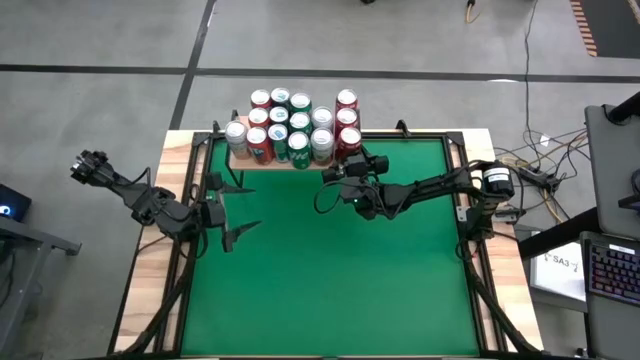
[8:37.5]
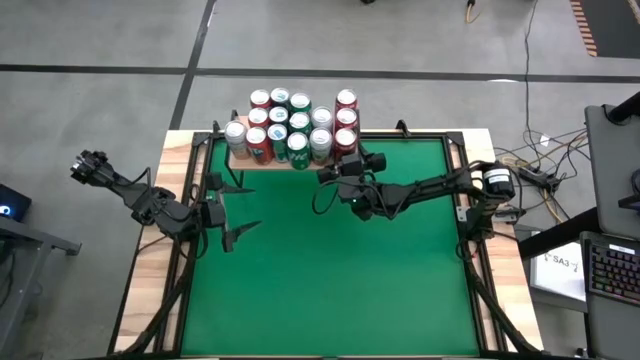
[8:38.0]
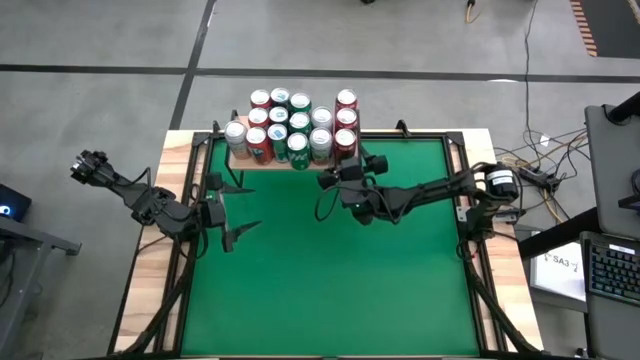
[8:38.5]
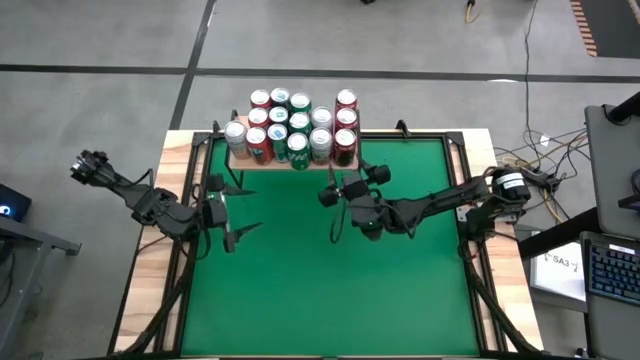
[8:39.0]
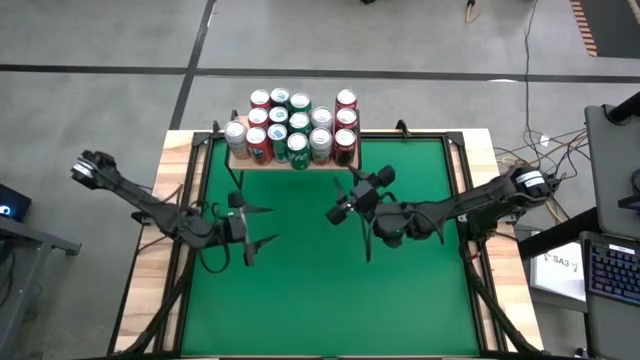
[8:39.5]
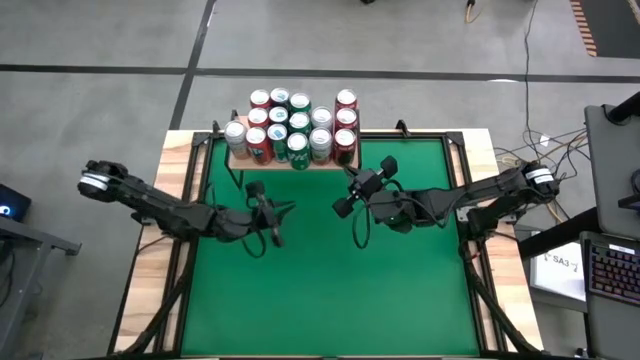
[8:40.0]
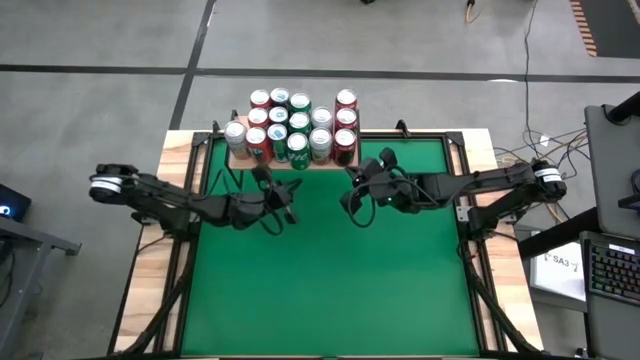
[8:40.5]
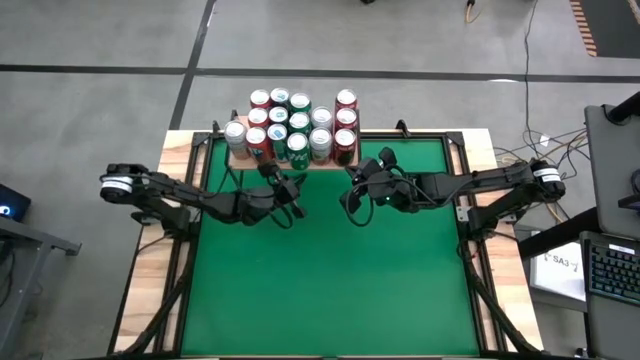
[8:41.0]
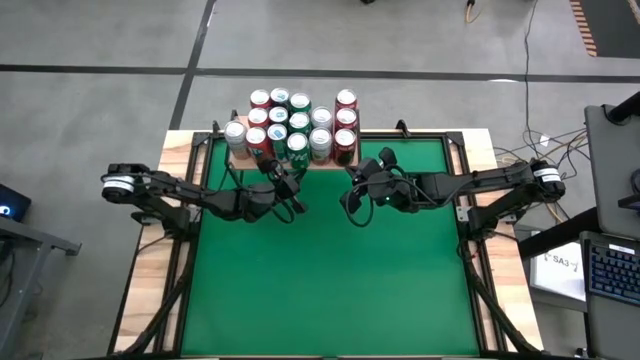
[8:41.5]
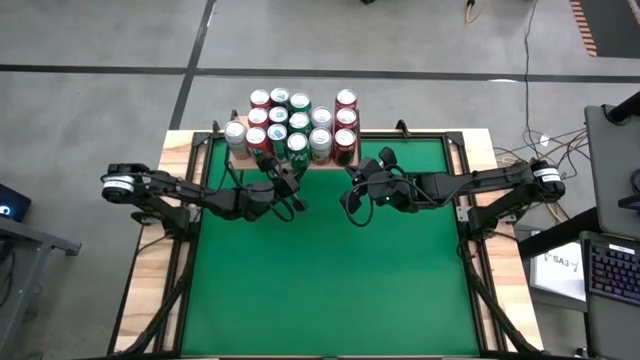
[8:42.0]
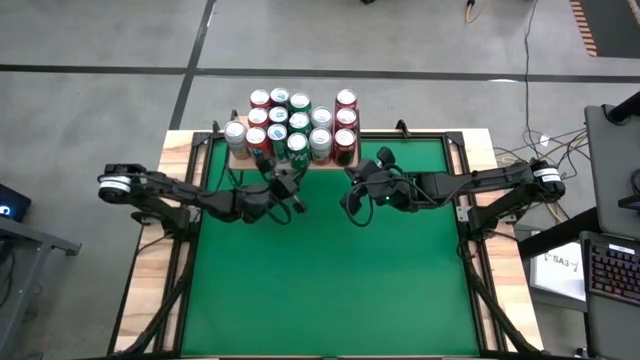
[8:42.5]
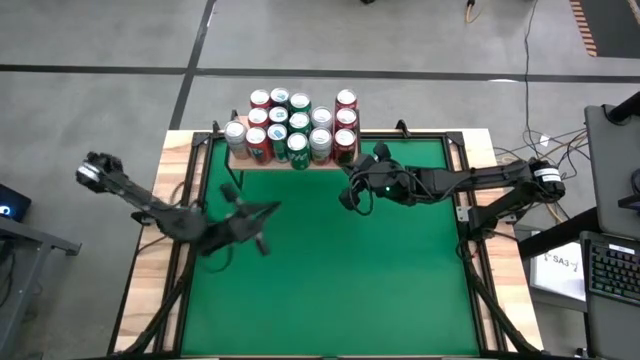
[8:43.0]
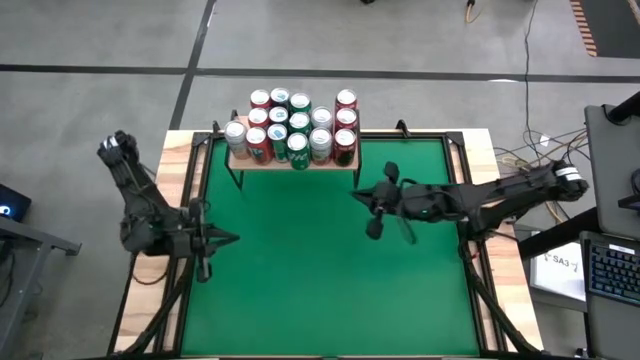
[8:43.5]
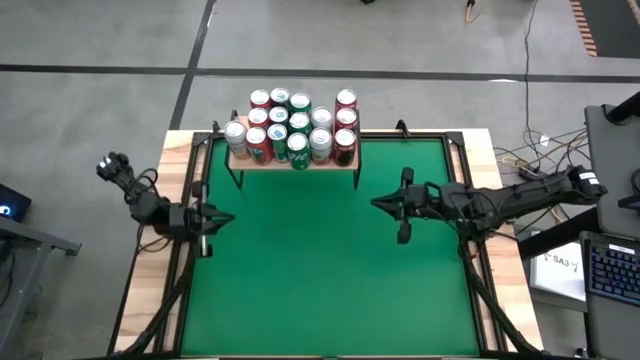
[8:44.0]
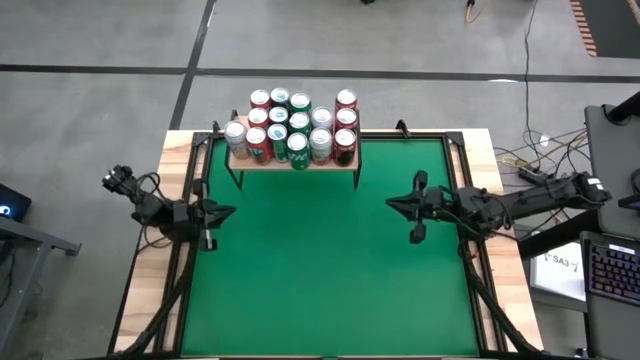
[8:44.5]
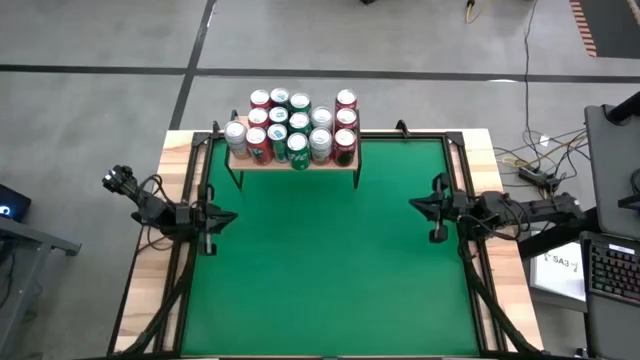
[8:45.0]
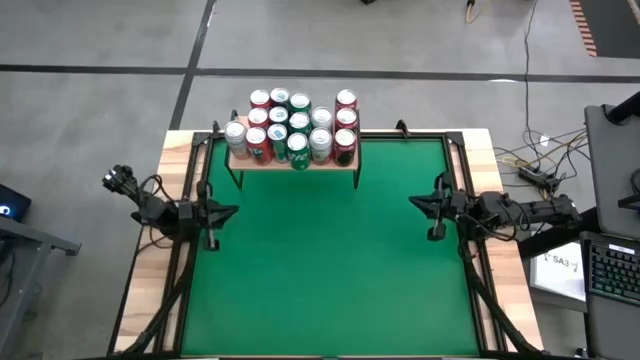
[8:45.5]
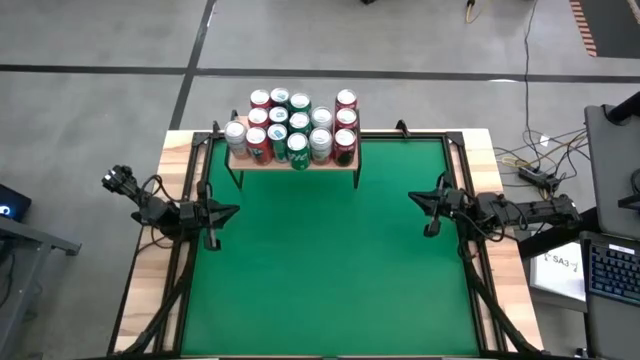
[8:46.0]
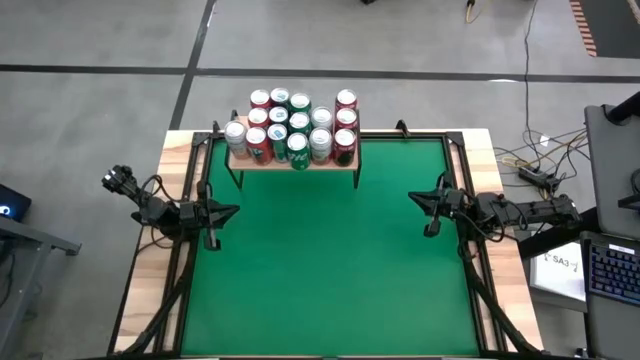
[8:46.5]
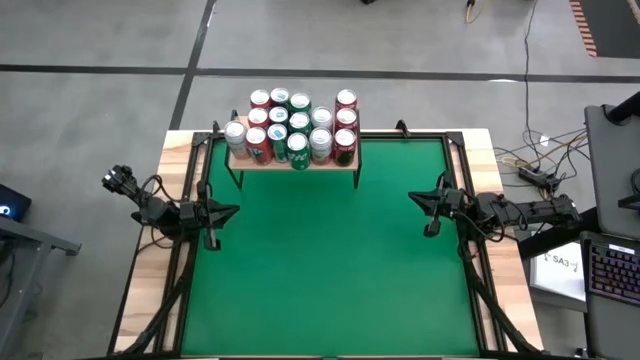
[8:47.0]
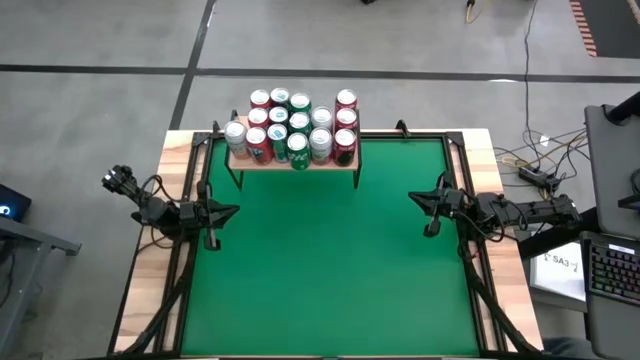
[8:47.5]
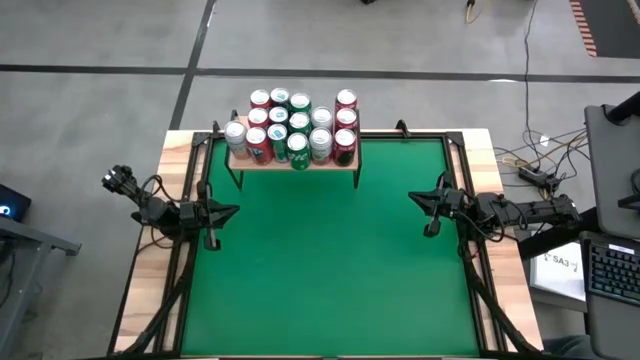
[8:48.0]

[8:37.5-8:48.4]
Task: Place canned beverage on shelf
Return to home position

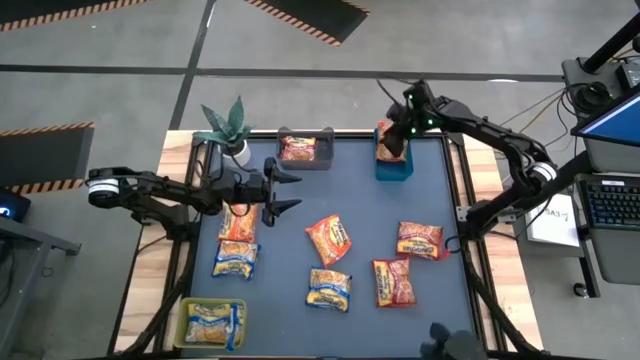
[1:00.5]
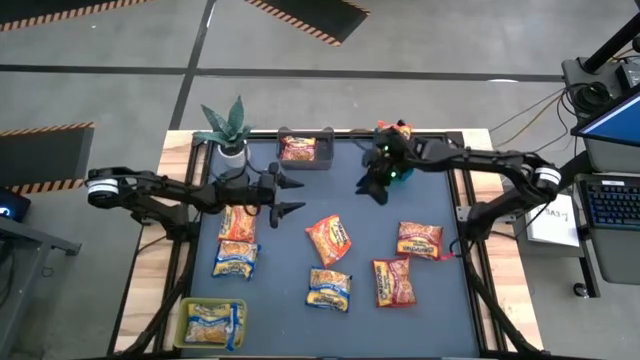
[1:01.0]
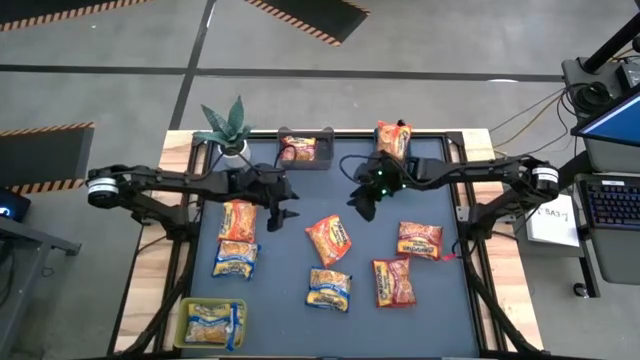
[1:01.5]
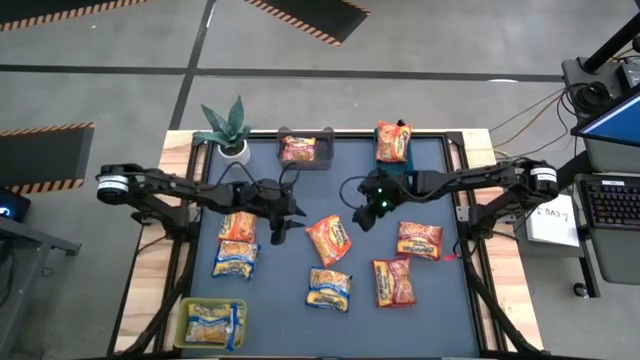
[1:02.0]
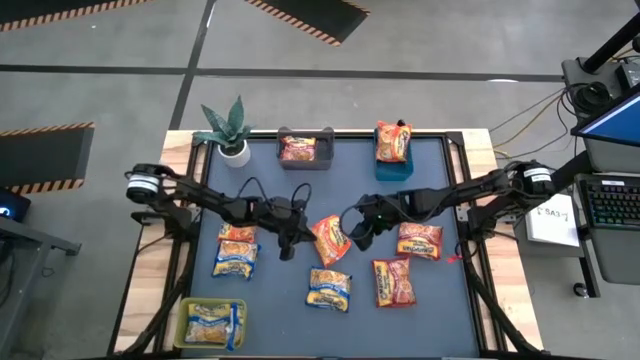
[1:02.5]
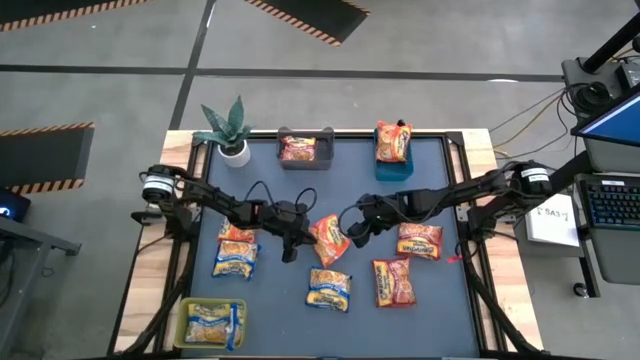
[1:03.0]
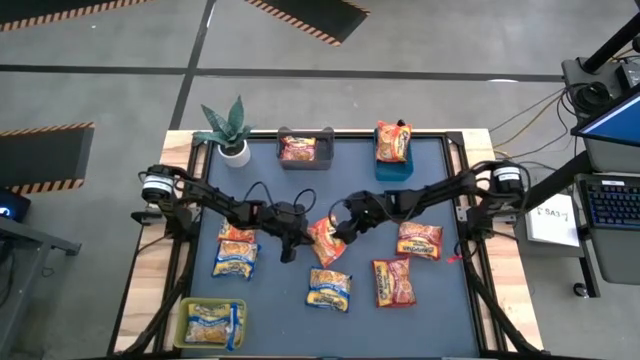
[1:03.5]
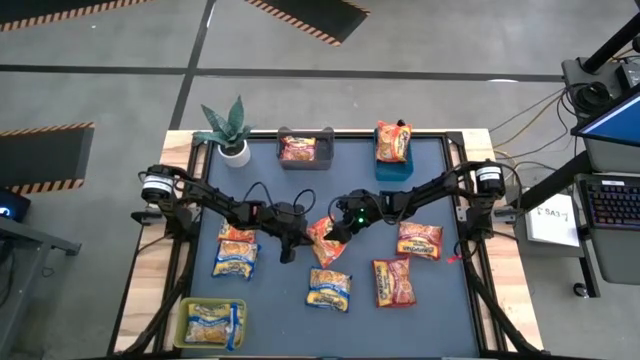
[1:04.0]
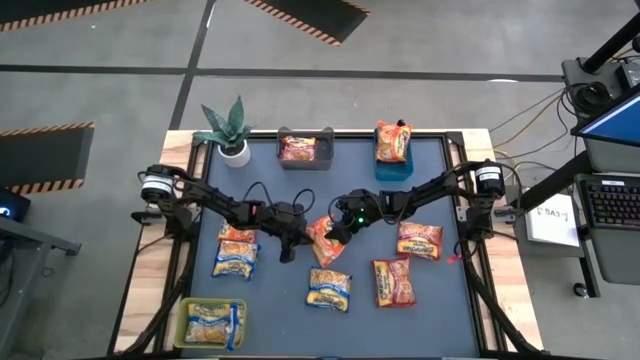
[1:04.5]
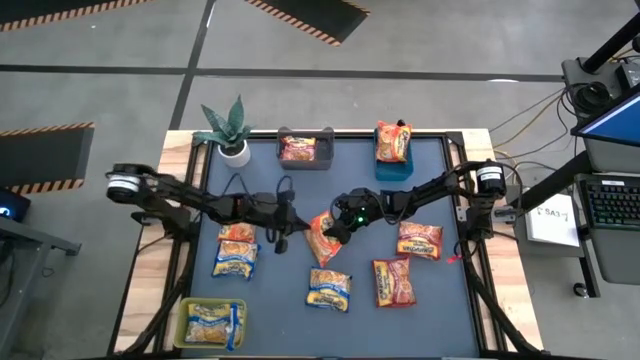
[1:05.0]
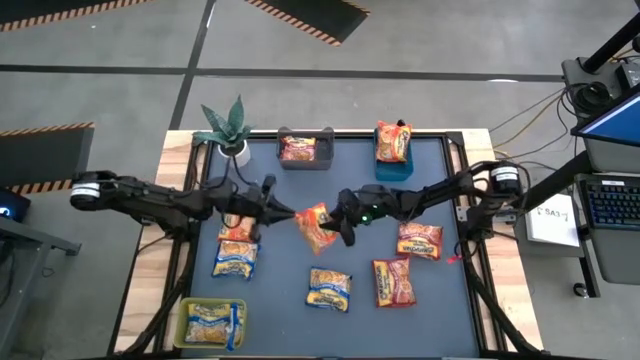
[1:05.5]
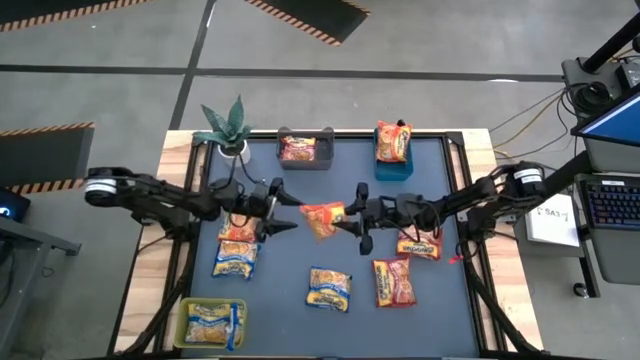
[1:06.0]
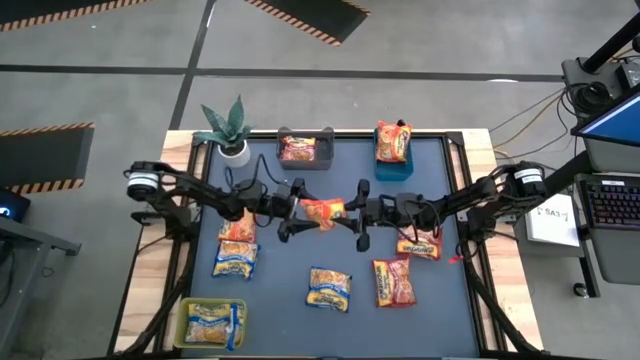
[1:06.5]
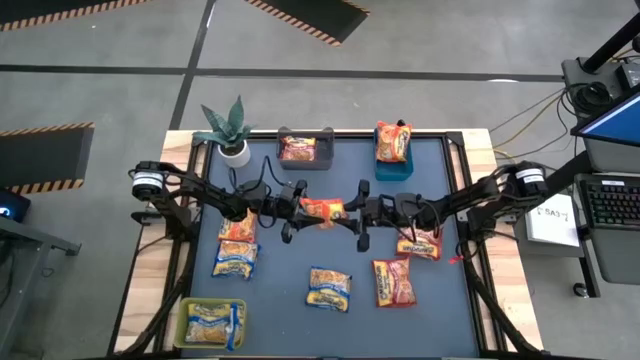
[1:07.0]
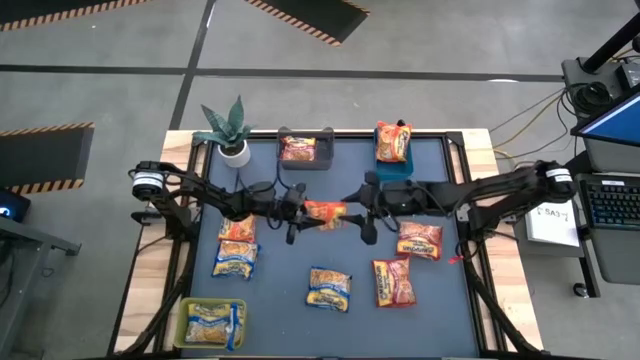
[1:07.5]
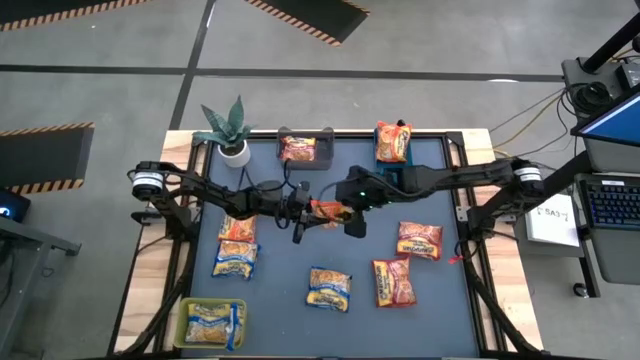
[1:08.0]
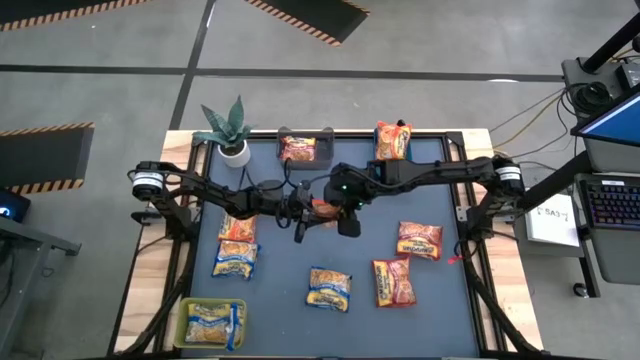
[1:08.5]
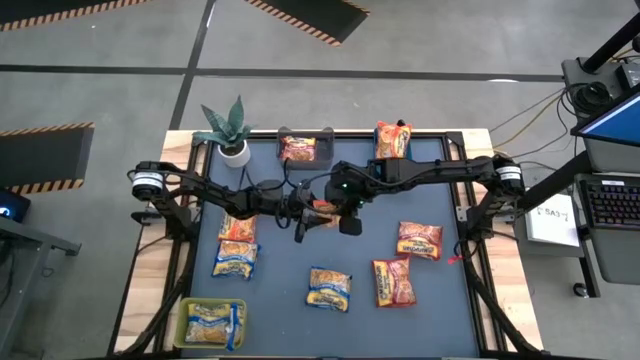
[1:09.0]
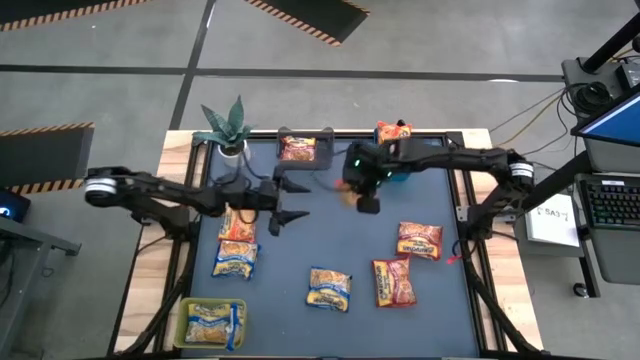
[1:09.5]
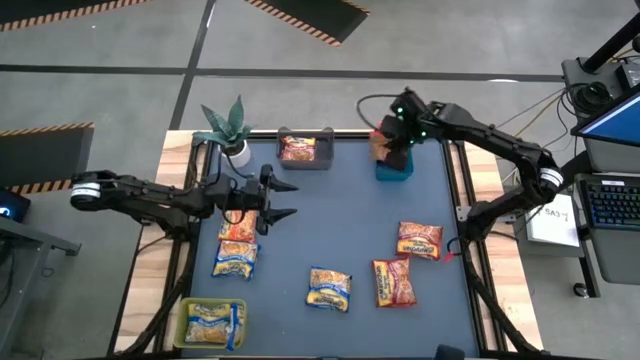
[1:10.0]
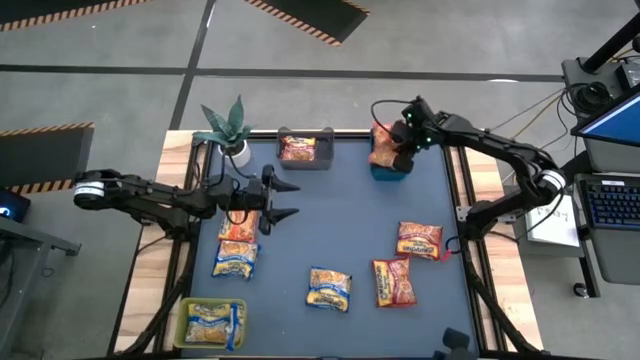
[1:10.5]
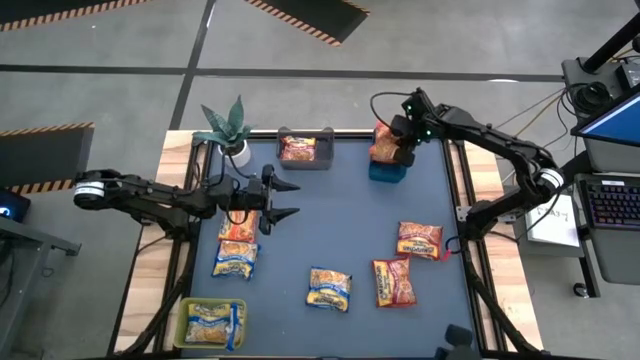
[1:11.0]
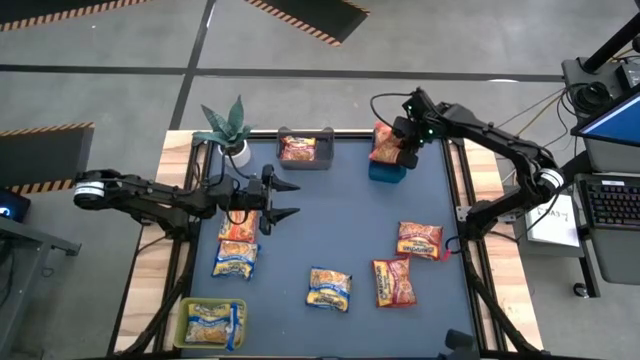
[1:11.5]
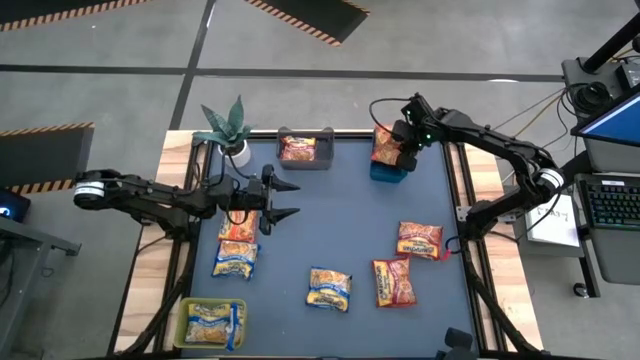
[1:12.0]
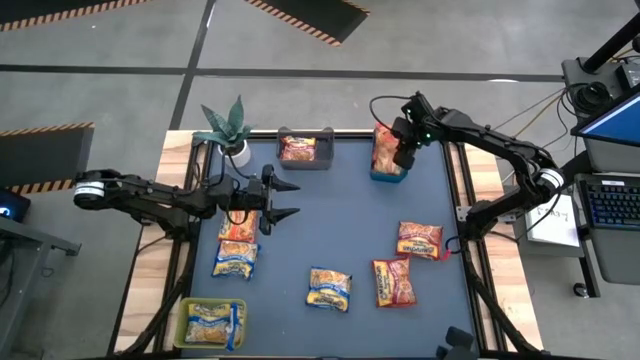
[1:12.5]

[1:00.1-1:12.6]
Task: Sort Maruchan noodles
Put the right orange noodle pack into the blue bin
